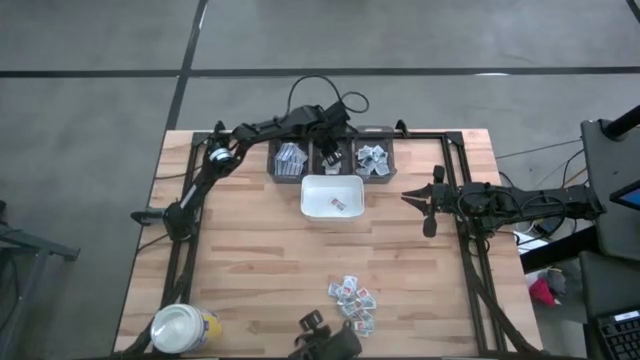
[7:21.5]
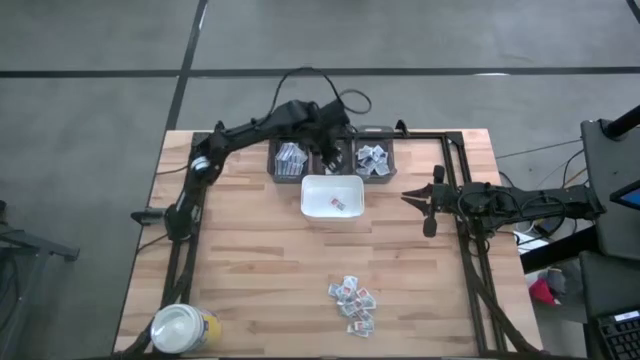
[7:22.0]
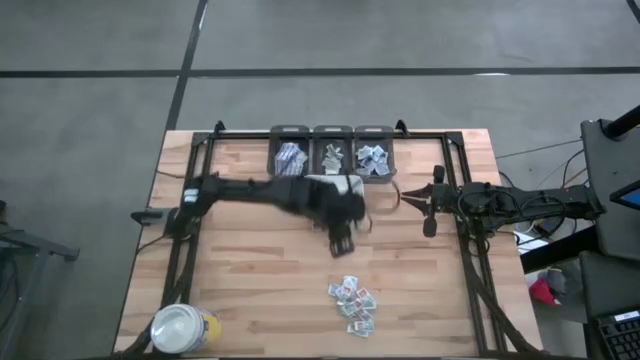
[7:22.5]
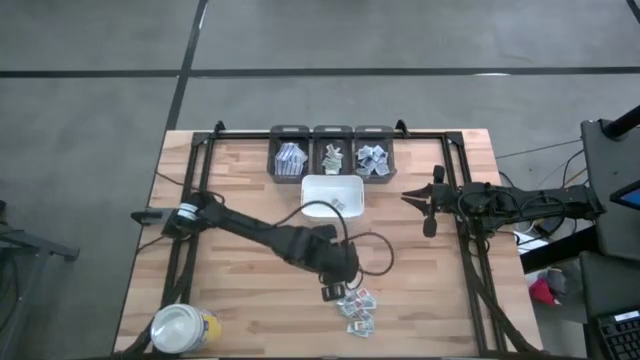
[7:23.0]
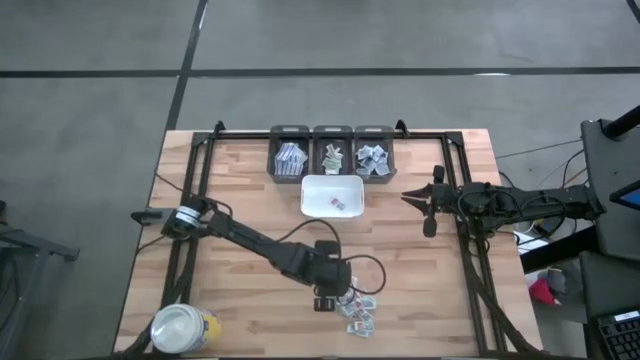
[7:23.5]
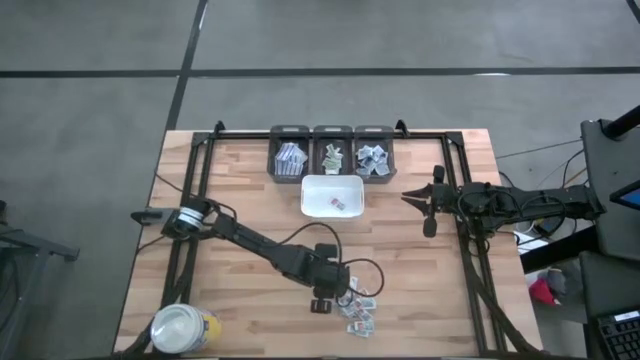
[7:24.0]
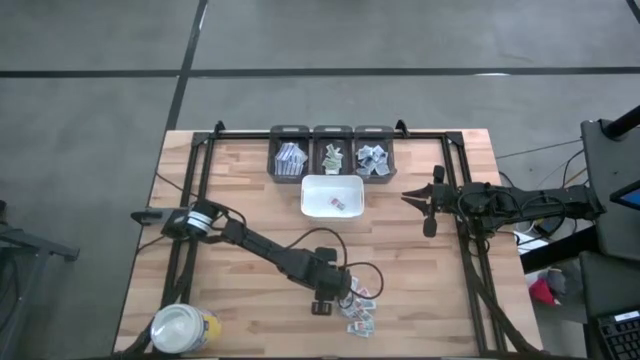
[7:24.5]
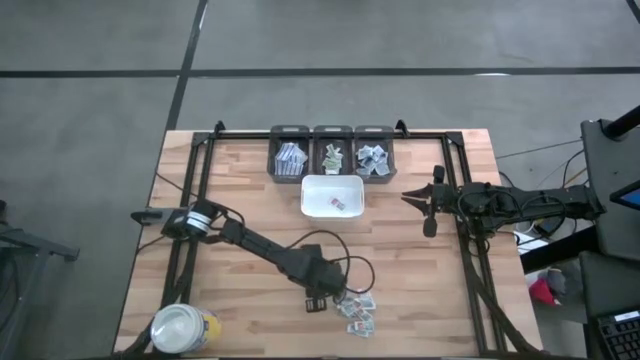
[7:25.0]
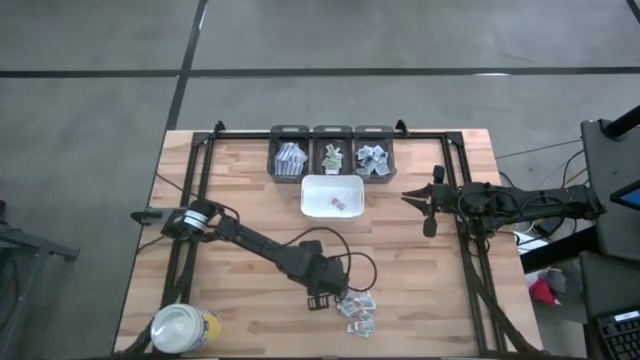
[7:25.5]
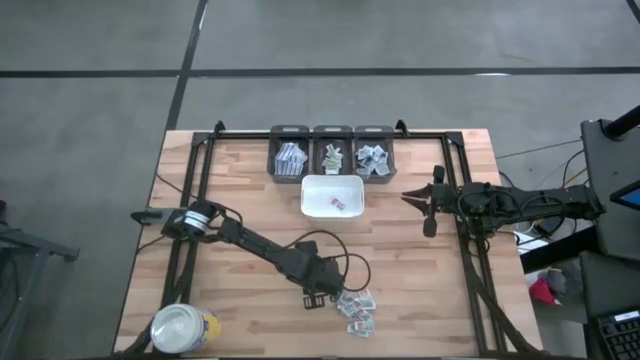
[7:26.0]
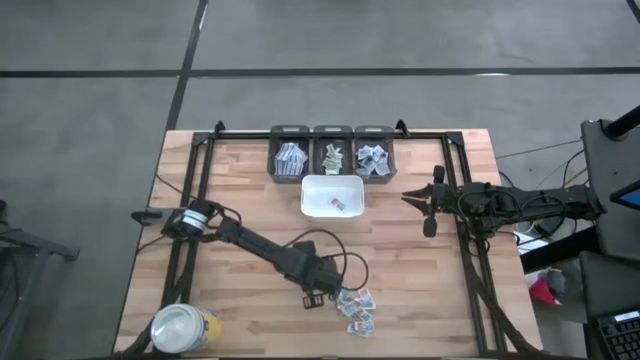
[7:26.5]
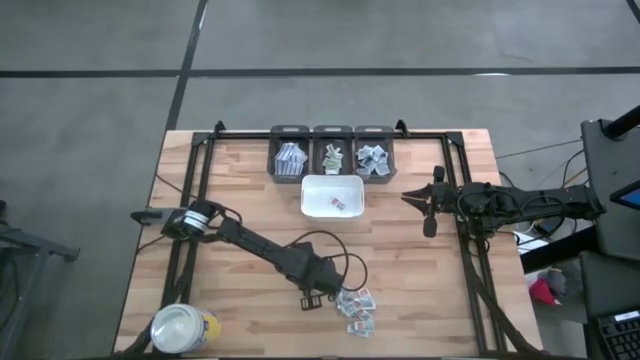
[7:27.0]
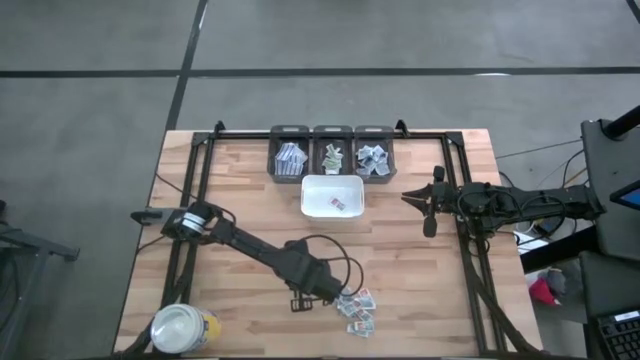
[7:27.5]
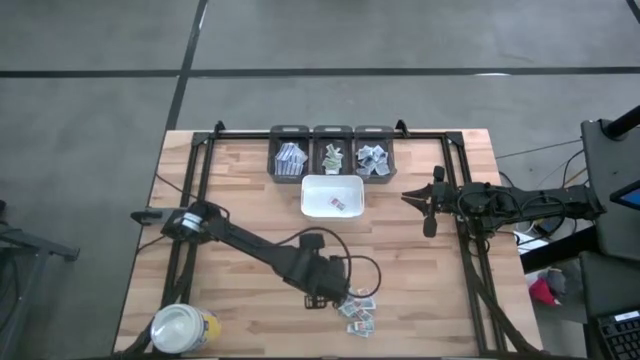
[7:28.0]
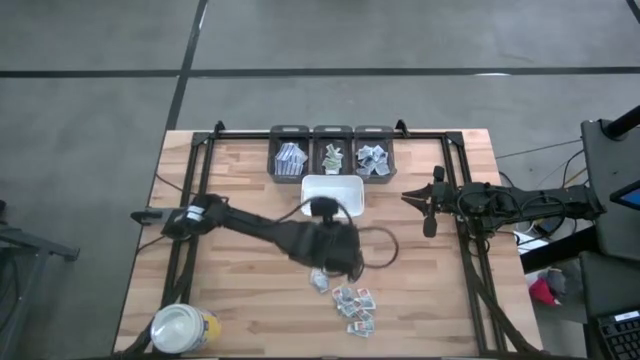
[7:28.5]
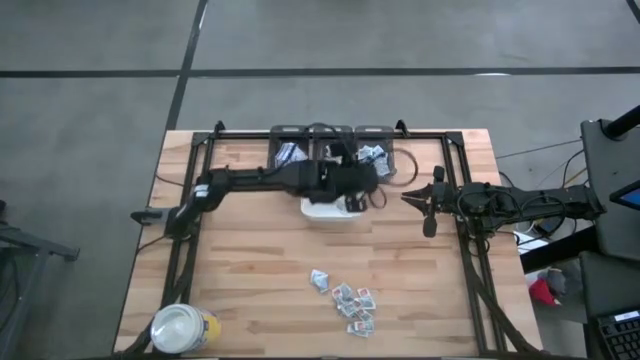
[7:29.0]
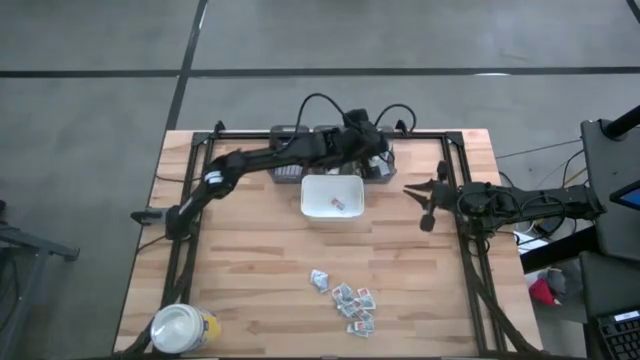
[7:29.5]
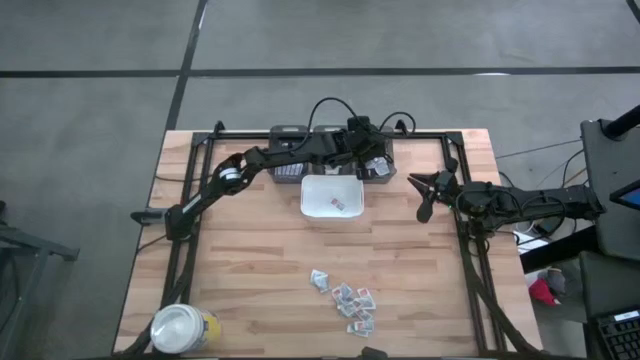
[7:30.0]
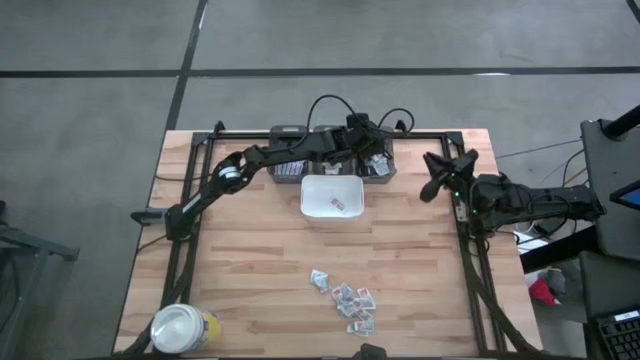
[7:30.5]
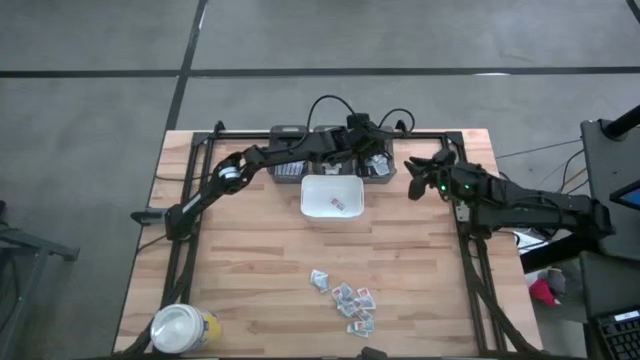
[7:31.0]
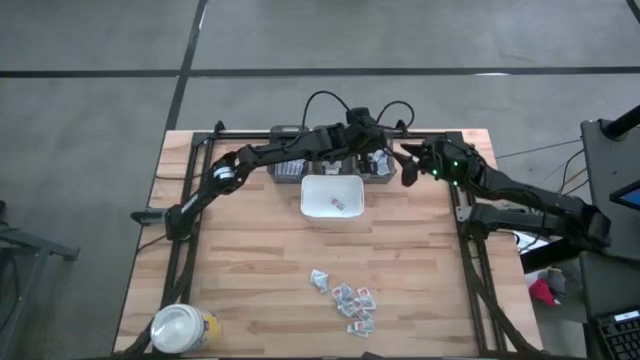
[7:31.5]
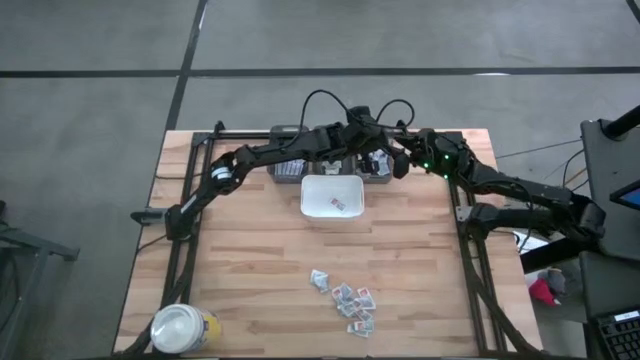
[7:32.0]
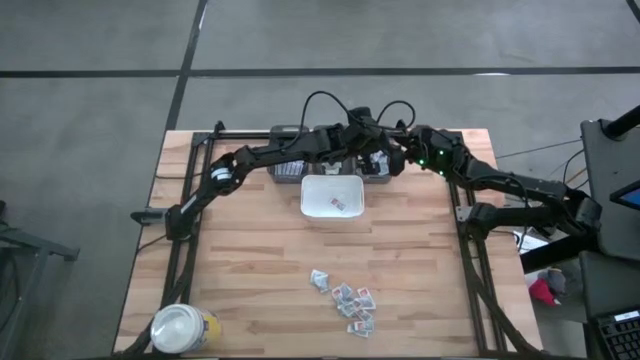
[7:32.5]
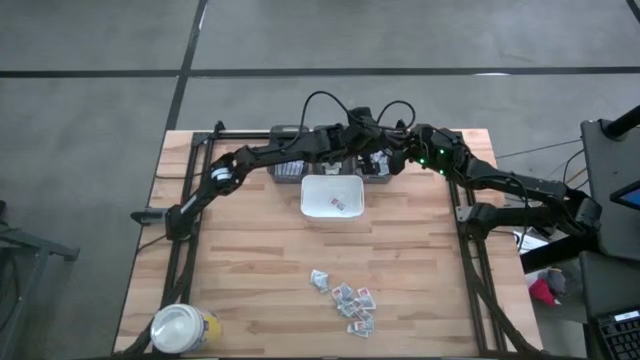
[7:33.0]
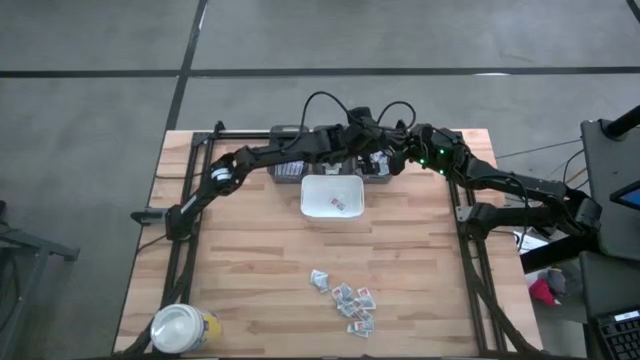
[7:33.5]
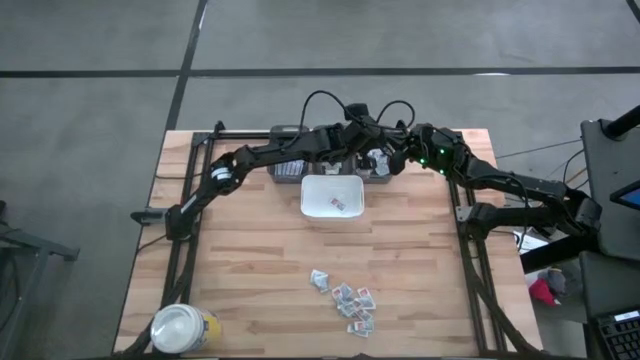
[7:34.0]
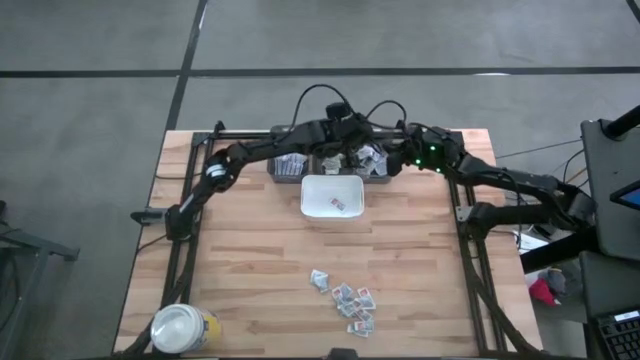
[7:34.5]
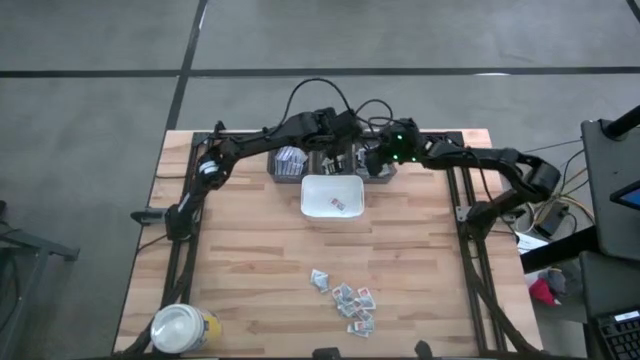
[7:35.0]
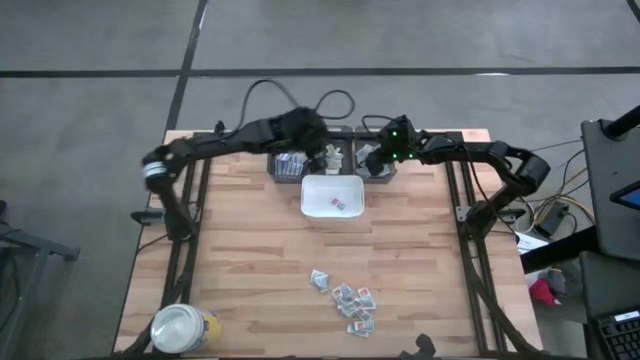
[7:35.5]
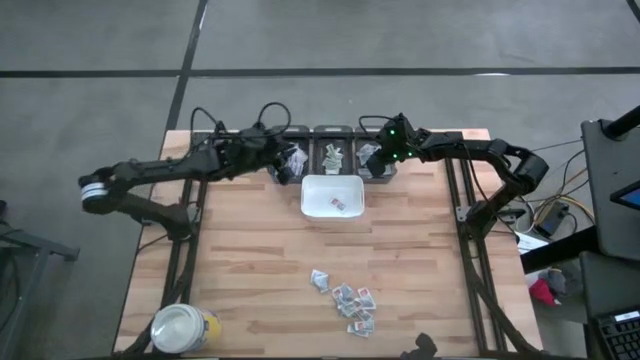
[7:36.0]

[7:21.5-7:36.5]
Task: Pick & Place First Aid Supplies
Put the white alcohol pad into the right black bin

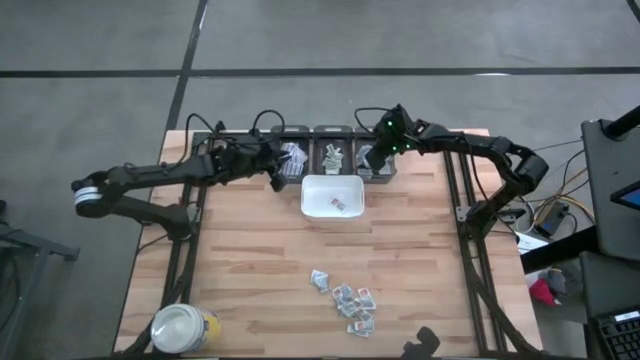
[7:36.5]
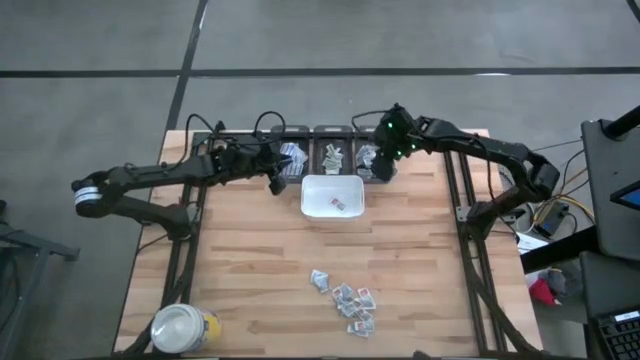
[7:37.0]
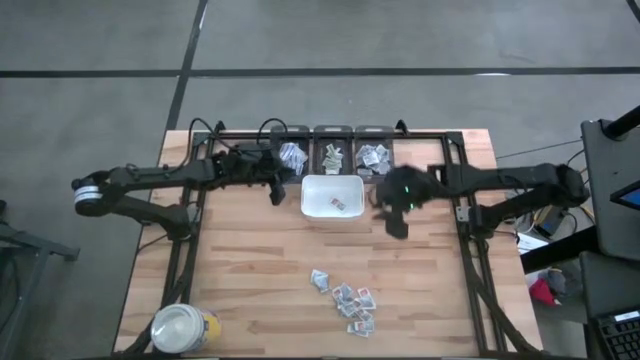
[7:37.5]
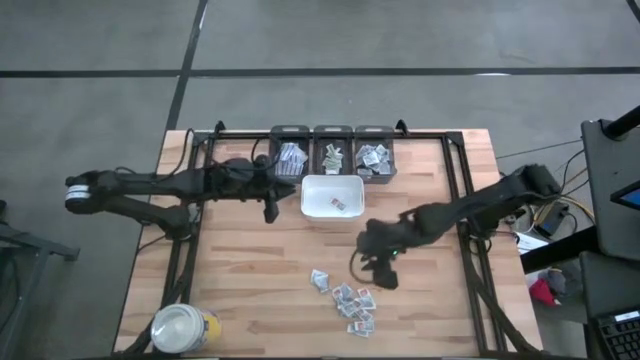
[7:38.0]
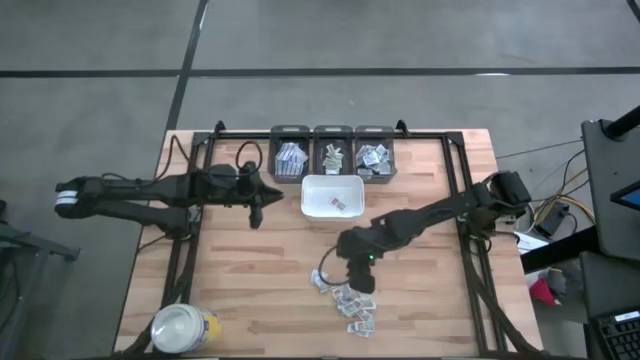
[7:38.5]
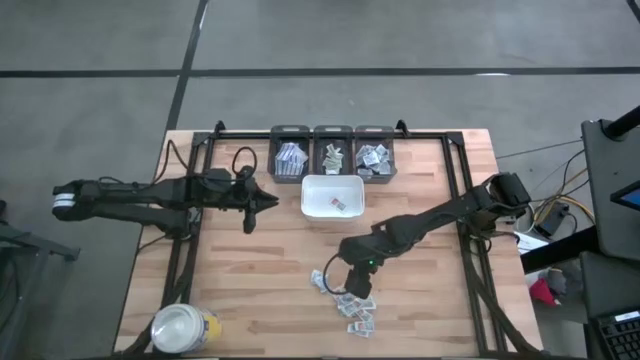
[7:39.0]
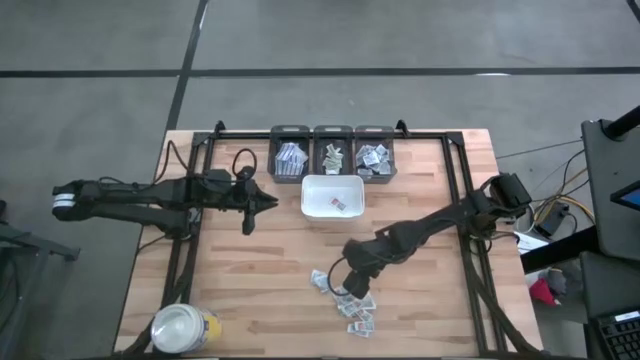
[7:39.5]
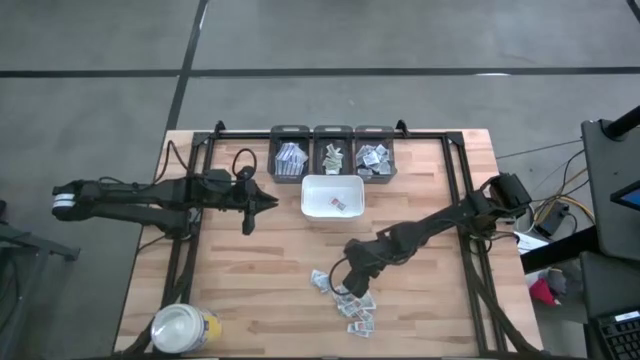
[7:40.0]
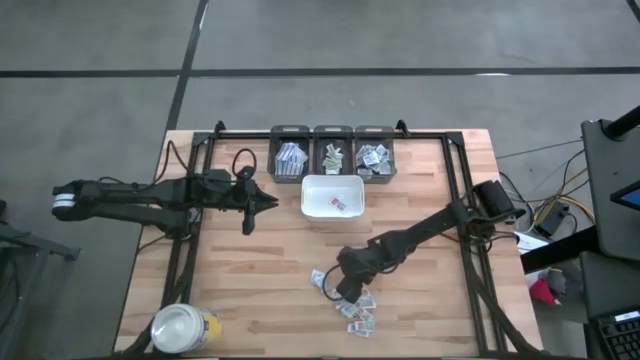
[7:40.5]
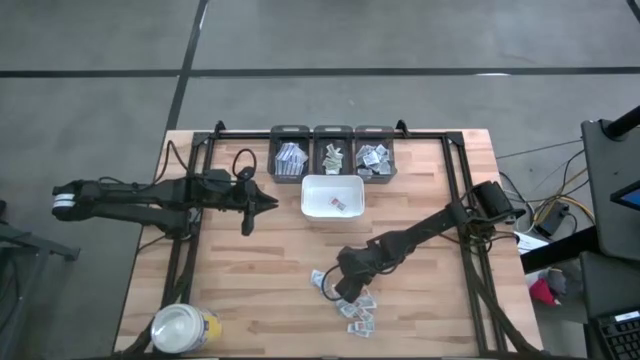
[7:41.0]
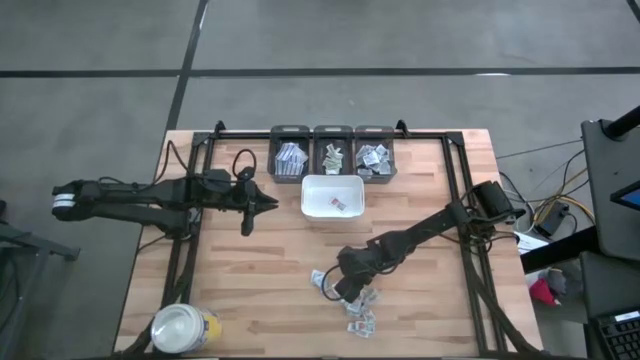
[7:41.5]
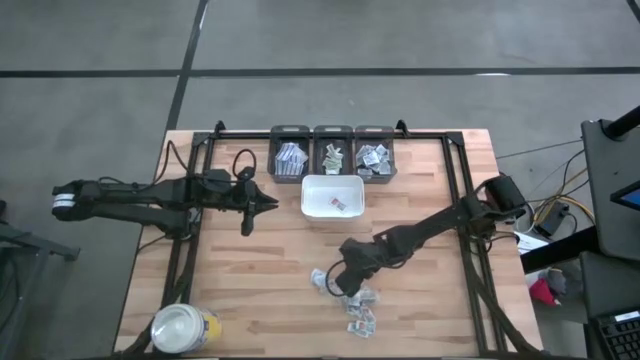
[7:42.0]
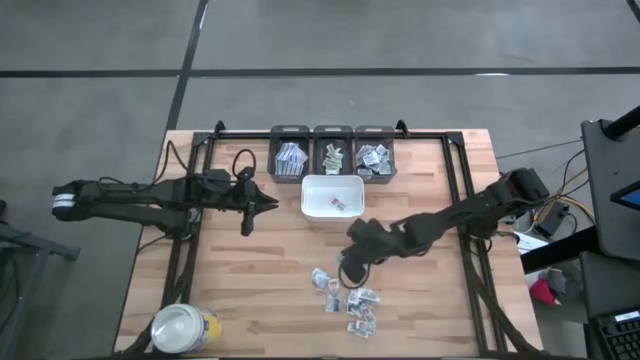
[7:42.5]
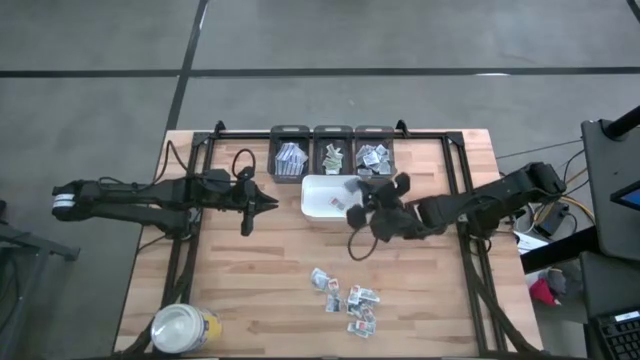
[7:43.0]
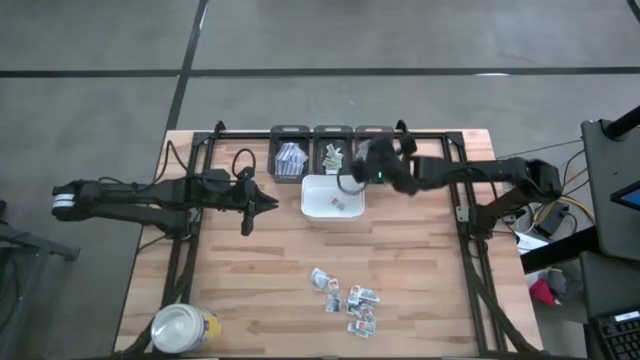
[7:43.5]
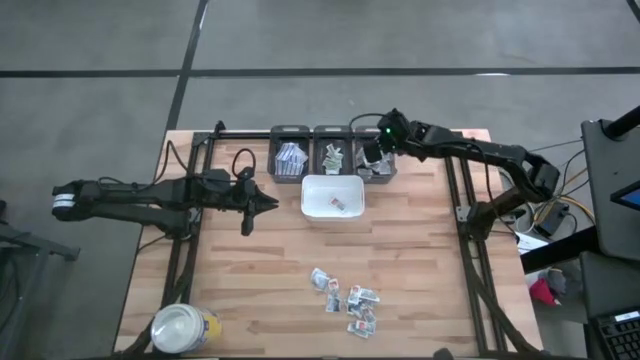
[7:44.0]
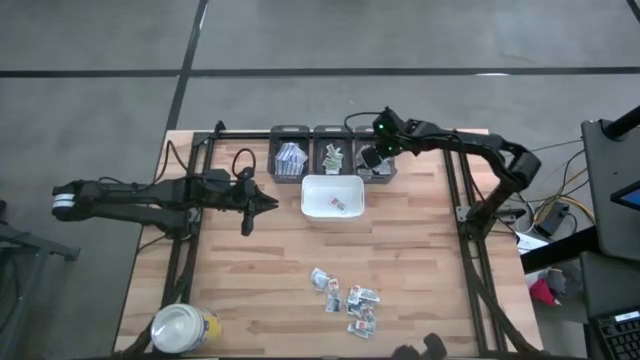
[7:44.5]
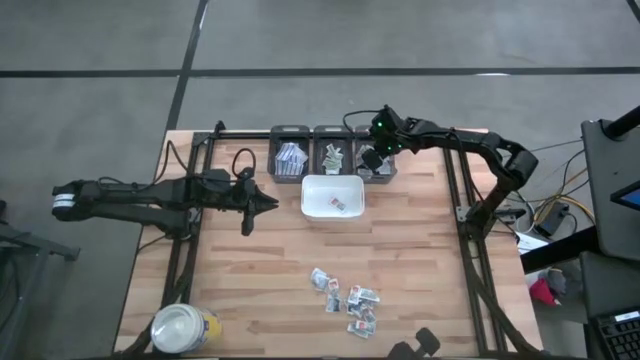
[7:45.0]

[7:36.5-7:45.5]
Put the white alcohol pad into the right black bin
